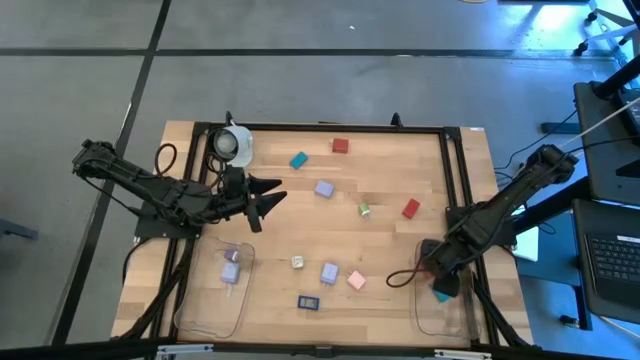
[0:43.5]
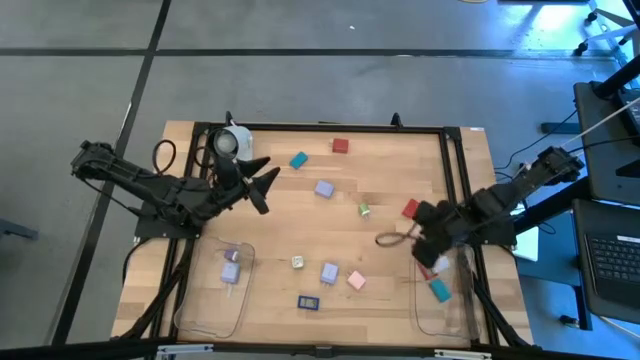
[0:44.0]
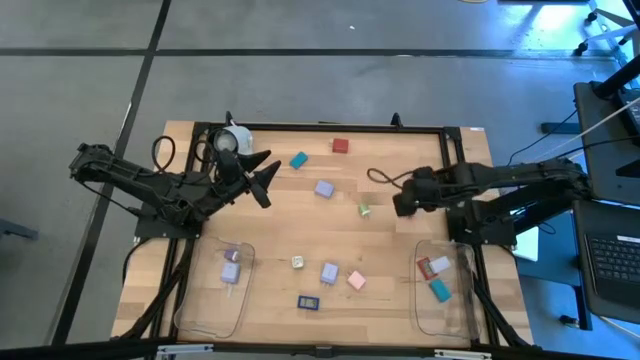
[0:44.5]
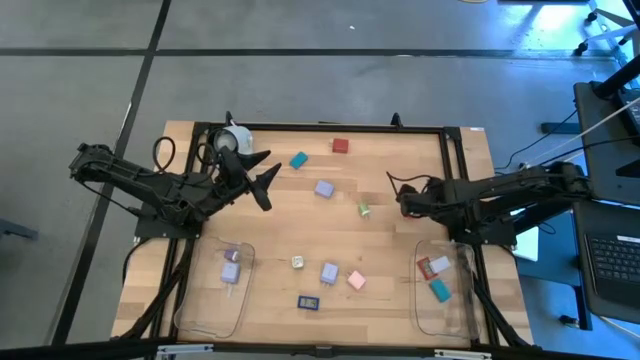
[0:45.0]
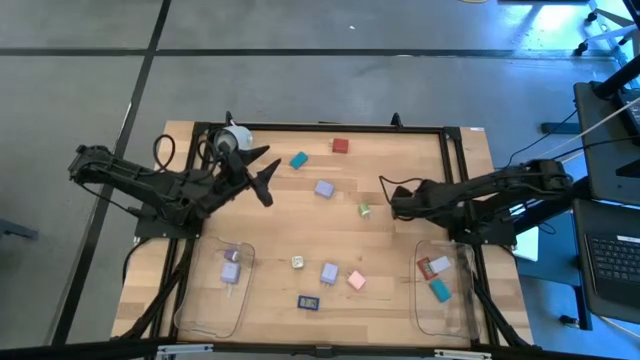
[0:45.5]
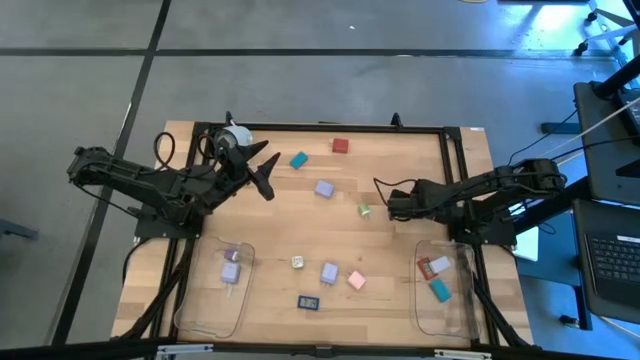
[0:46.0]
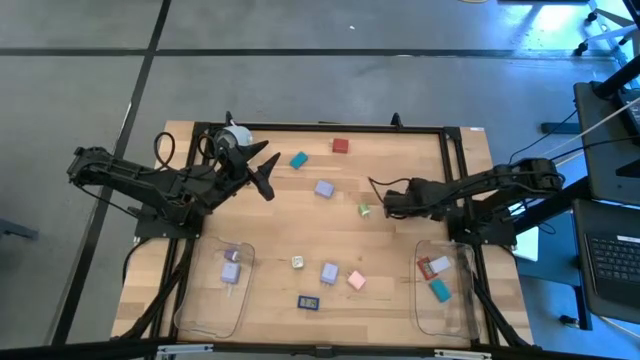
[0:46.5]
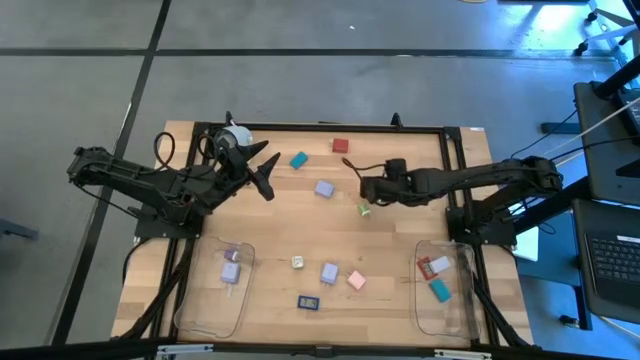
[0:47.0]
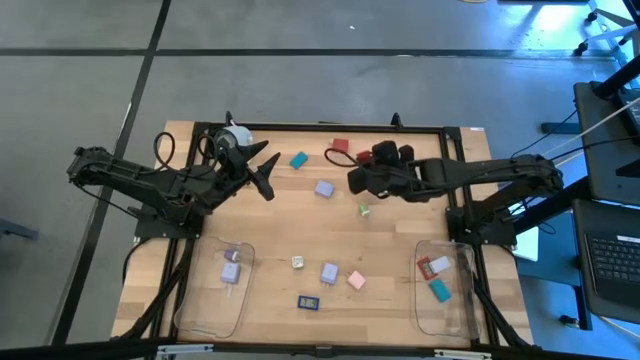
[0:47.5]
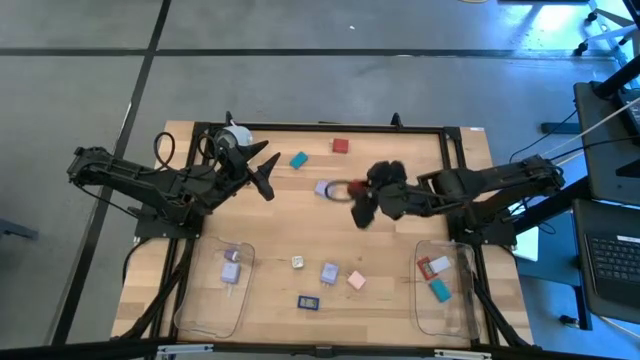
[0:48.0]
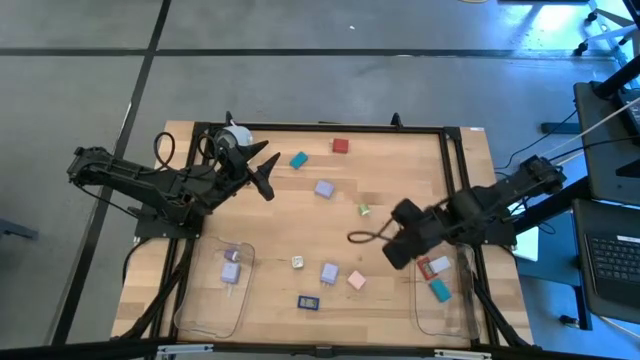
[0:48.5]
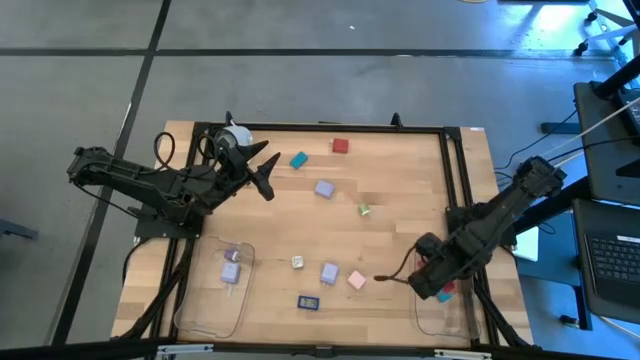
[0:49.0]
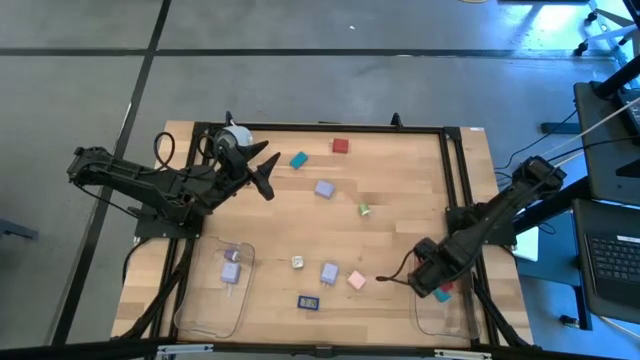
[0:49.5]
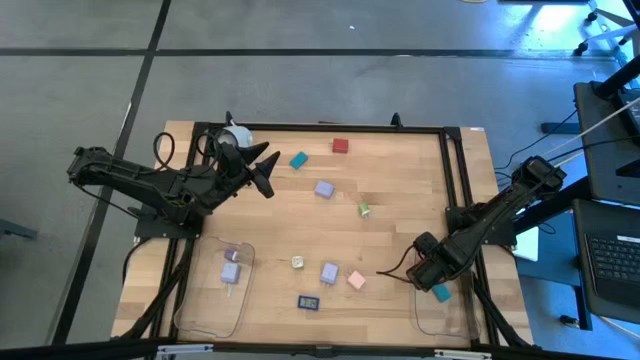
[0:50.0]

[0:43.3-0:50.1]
Task: Pick & Place Office items
Put the orange timer into the right transparent bin

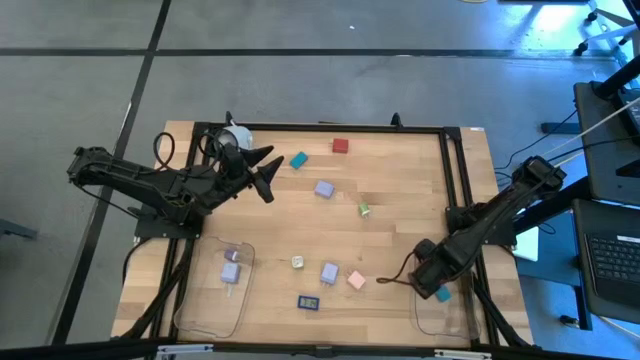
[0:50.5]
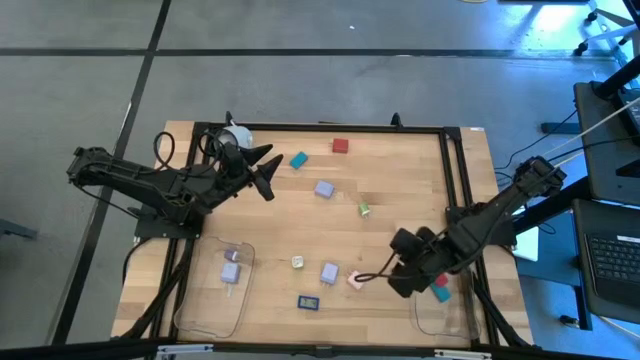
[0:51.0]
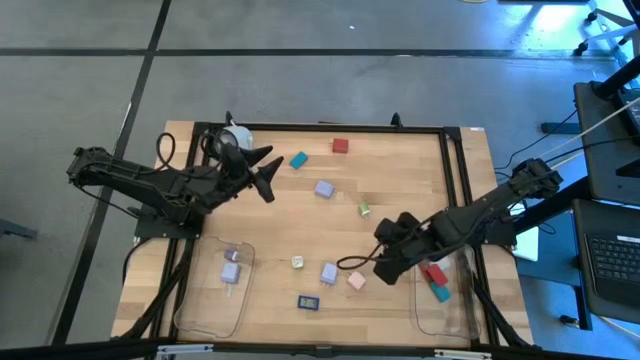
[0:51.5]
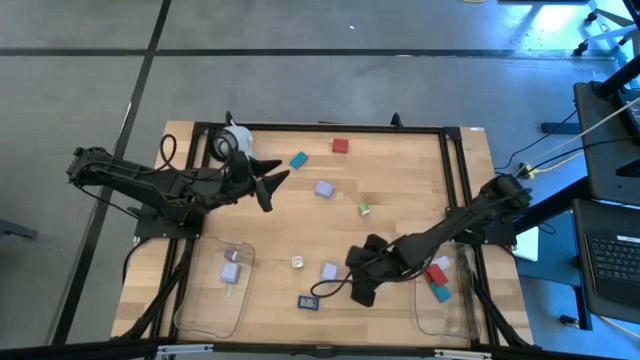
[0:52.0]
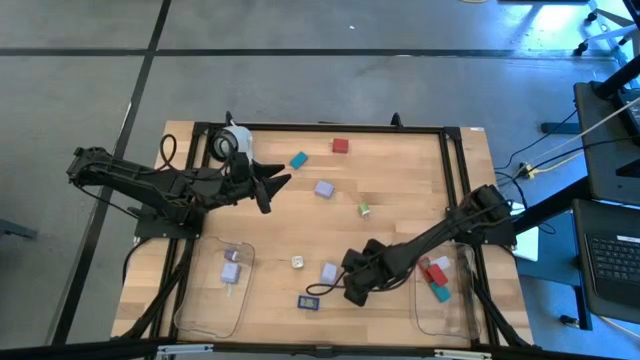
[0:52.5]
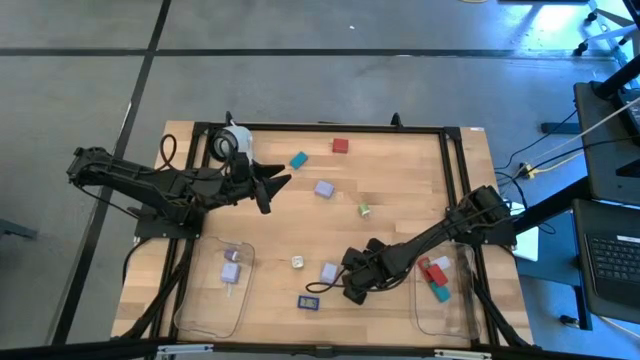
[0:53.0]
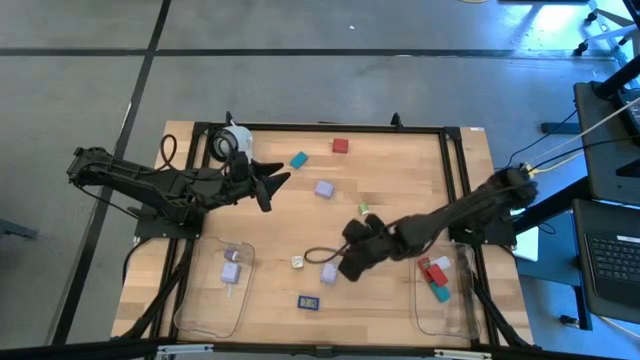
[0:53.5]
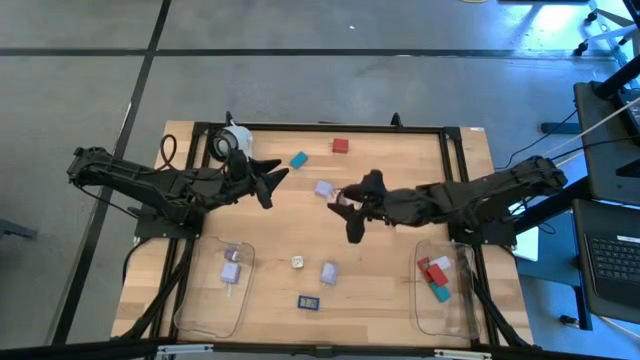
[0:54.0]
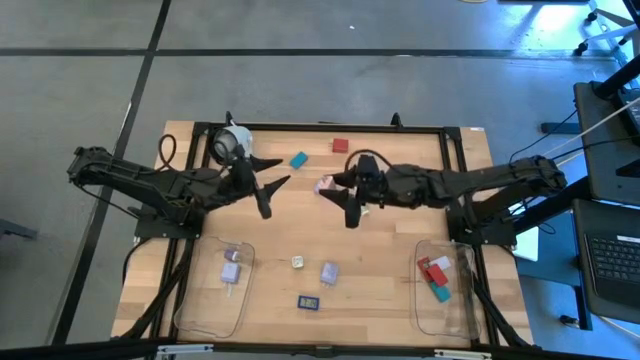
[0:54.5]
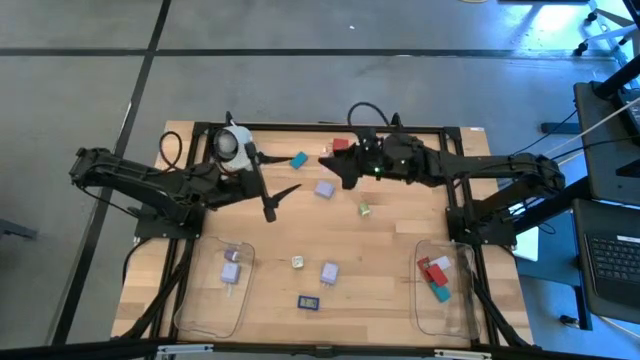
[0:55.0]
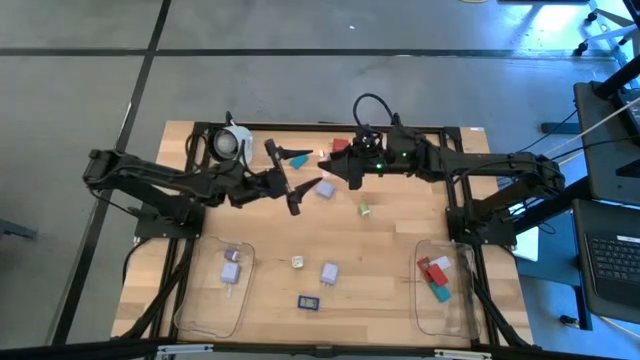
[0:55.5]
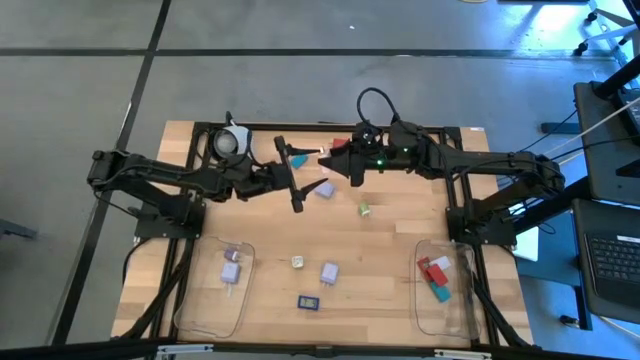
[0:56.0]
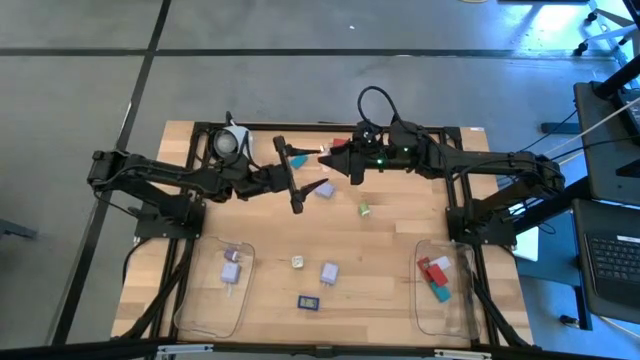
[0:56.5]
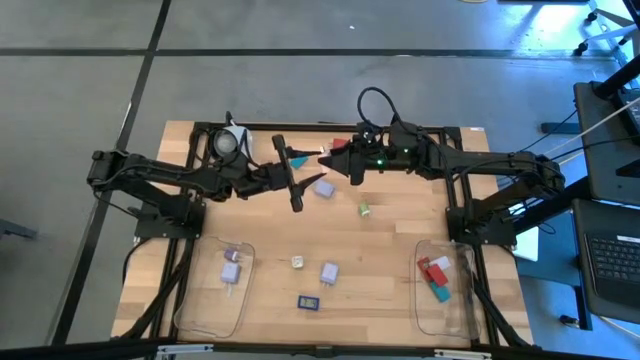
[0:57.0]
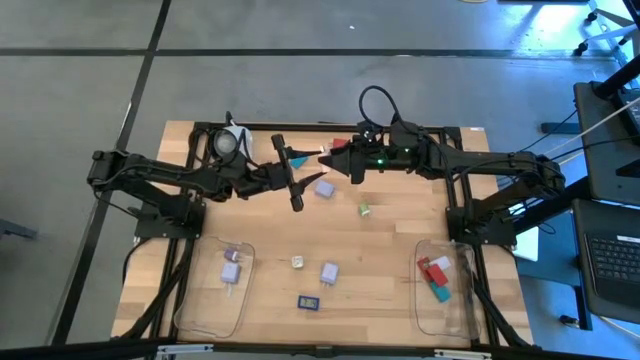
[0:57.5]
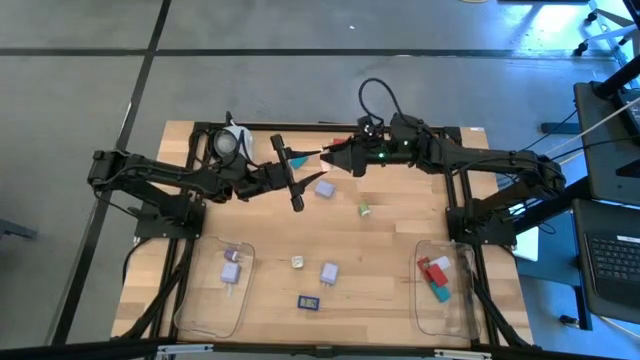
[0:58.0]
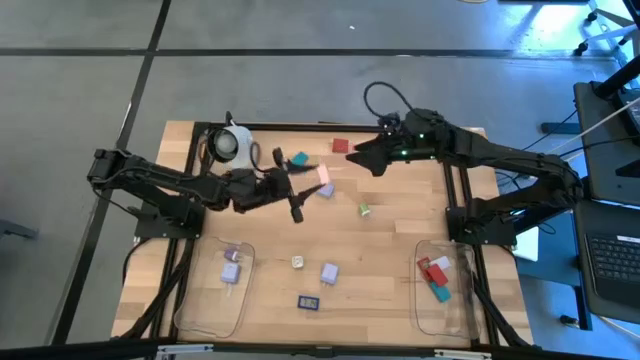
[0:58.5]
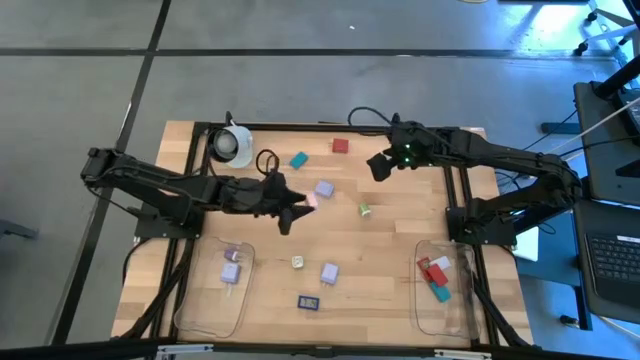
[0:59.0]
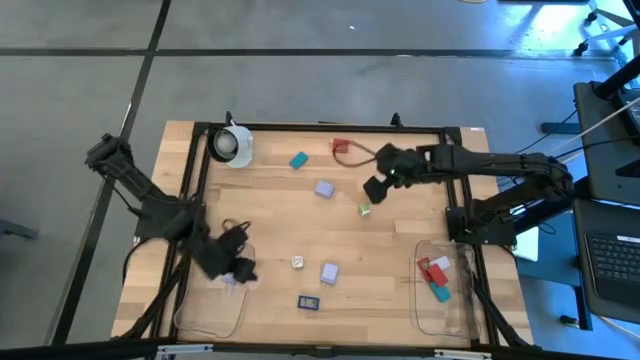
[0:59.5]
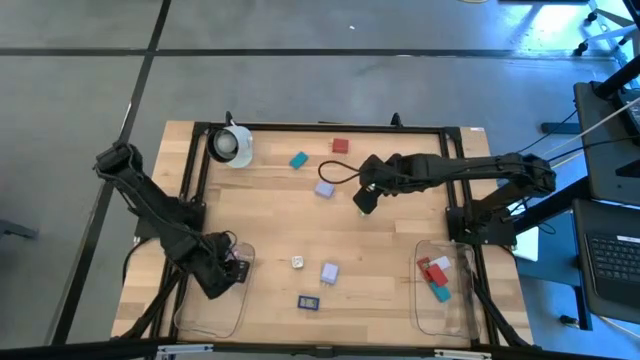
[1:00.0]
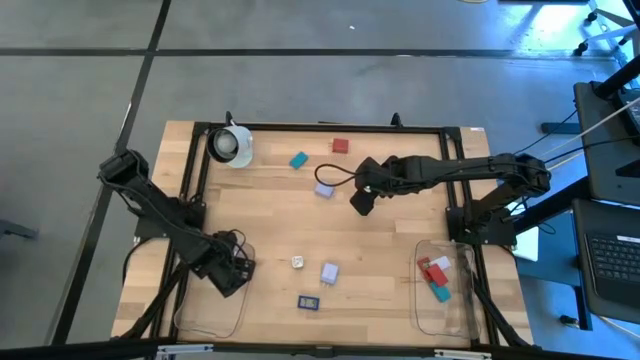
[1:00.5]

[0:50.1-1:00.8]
Put the white adapter into the left transparent bin

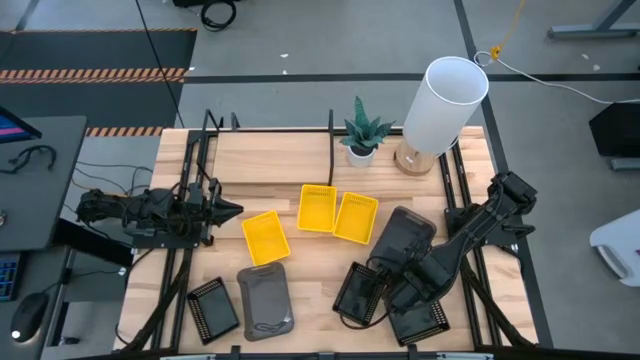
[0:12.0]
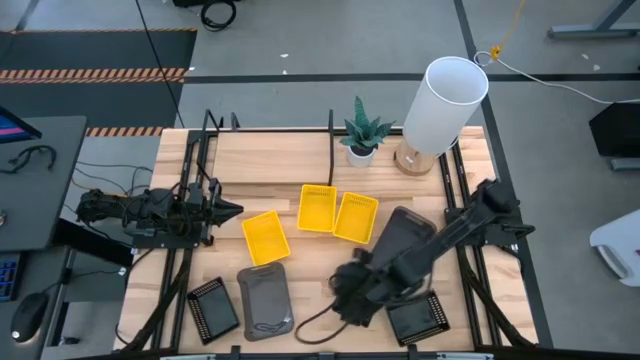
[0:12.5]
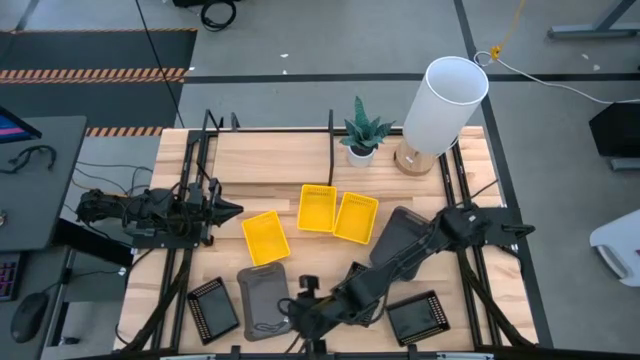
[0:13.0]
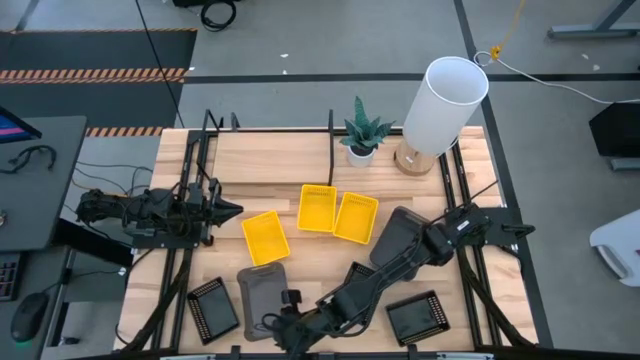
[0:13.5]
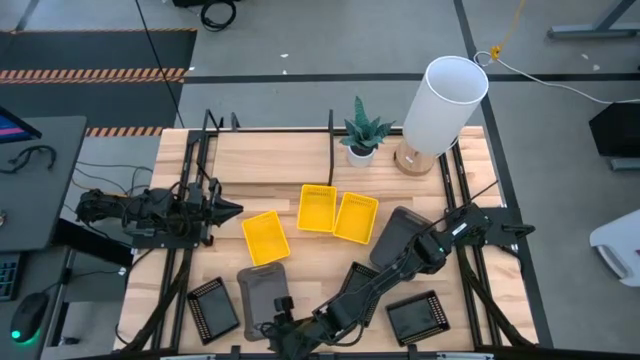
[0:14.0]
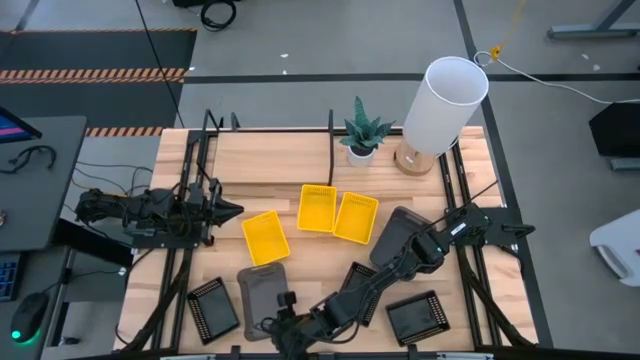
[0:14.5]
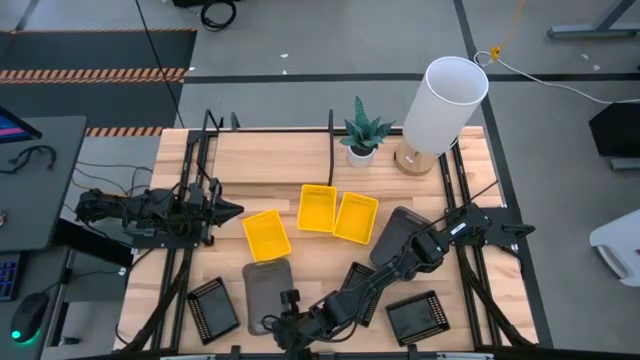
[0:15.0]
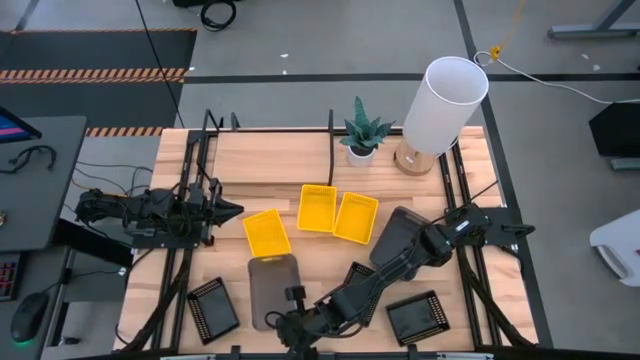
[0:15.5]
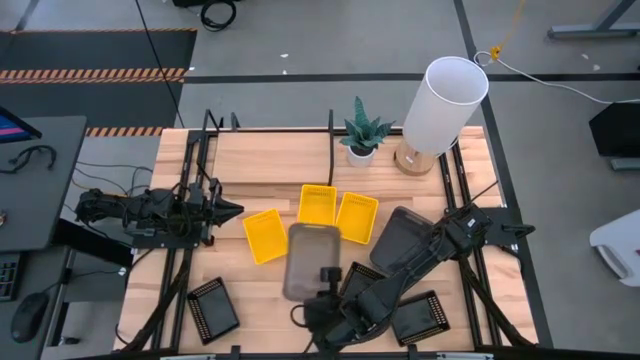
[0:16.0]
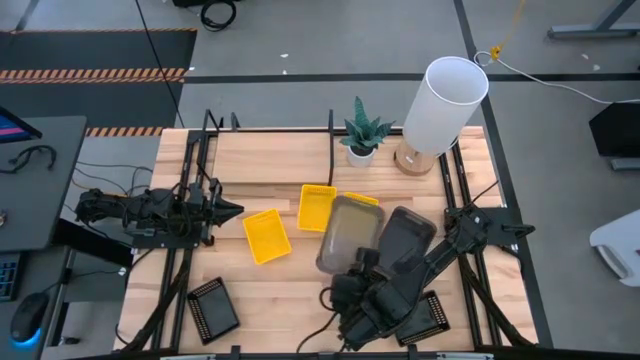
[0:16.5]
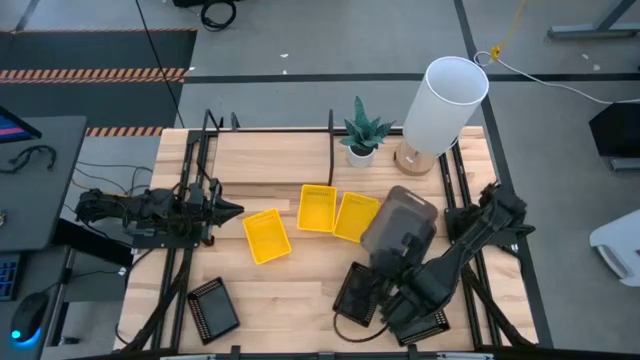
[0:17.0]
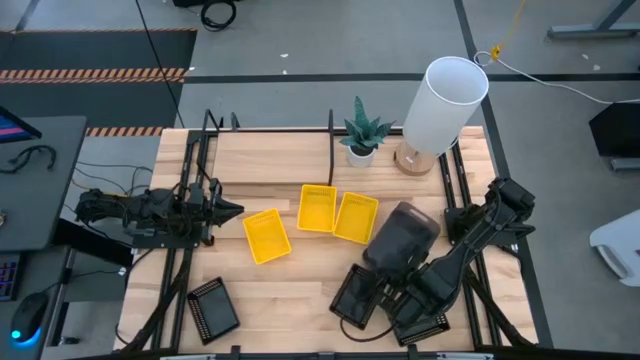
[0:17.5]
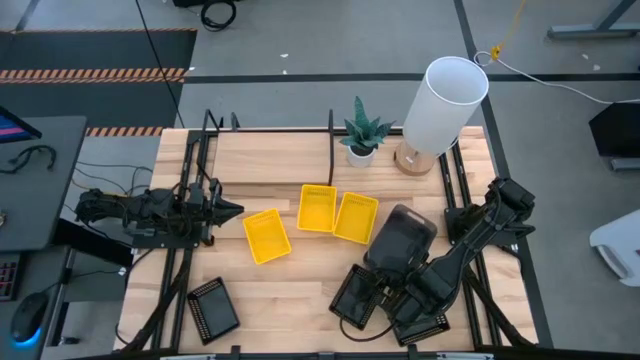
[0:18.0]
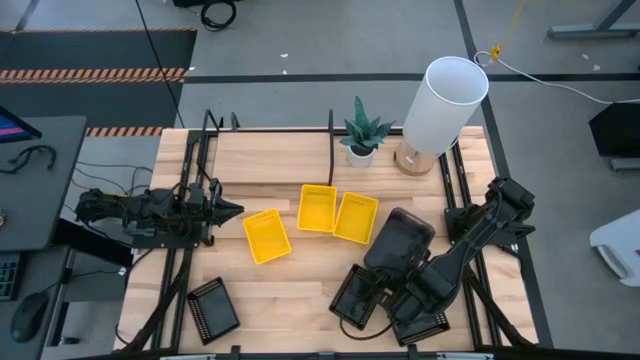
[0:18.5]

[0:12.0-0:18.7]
Task: Stack baskets on shelf by color
Stack the left transparent black bin into the black transparent bins
